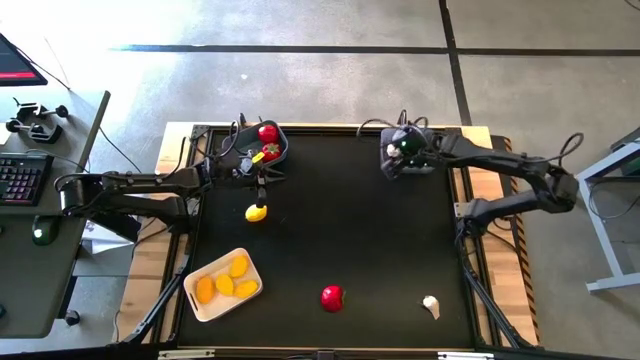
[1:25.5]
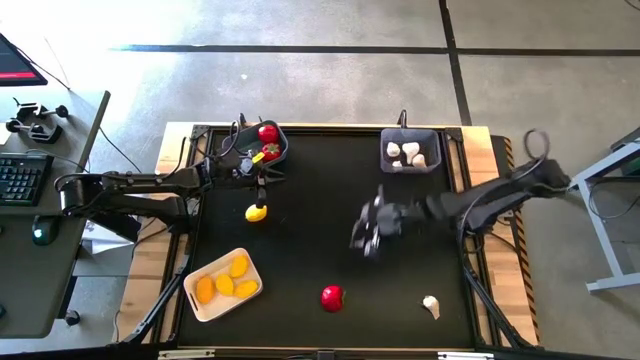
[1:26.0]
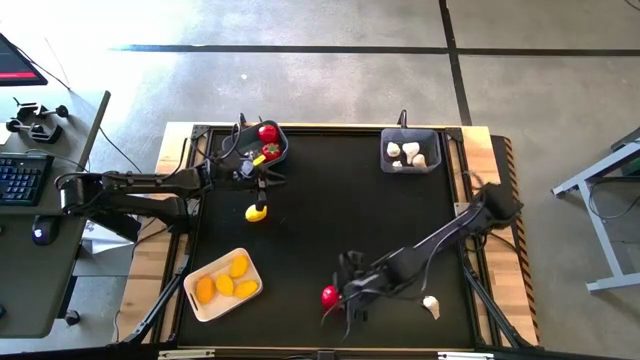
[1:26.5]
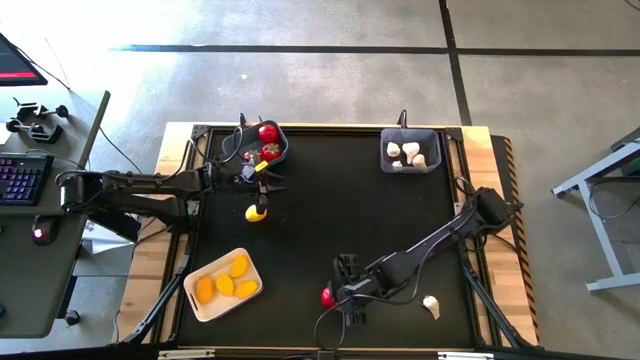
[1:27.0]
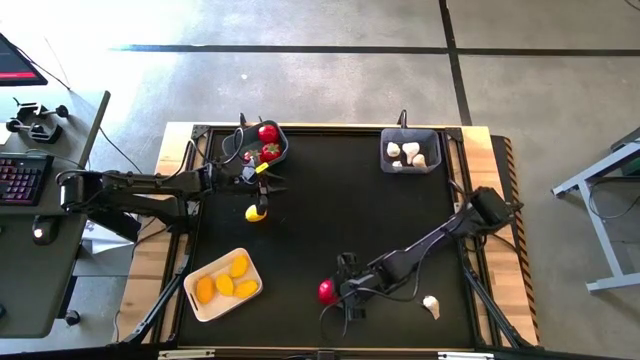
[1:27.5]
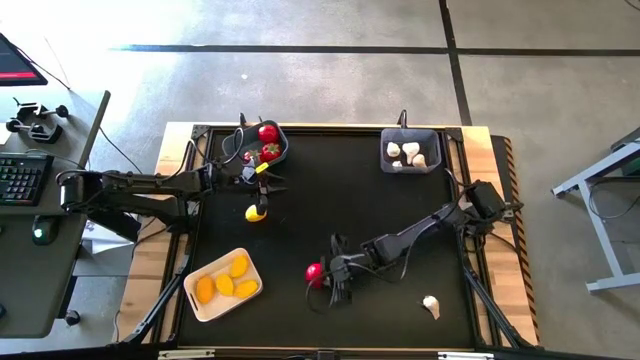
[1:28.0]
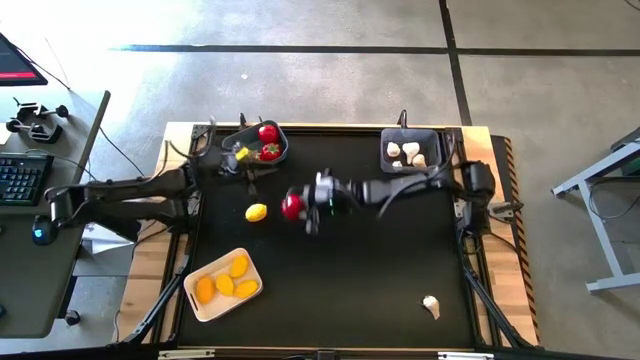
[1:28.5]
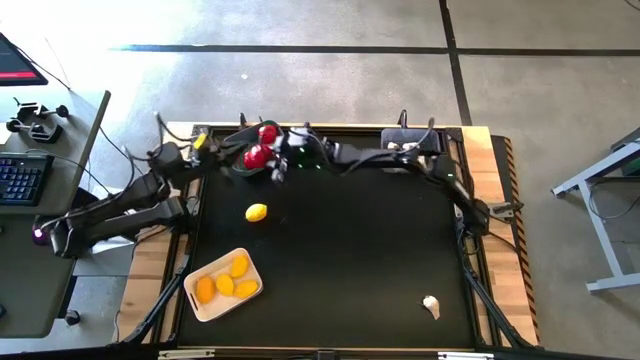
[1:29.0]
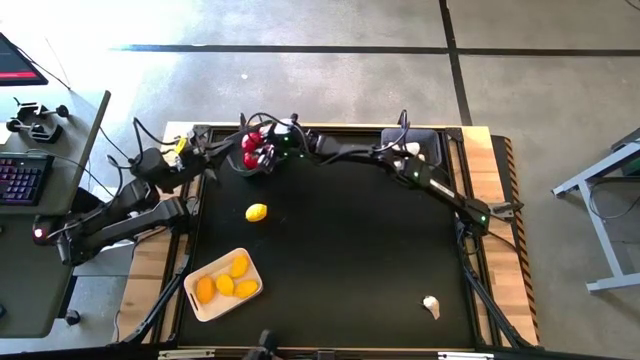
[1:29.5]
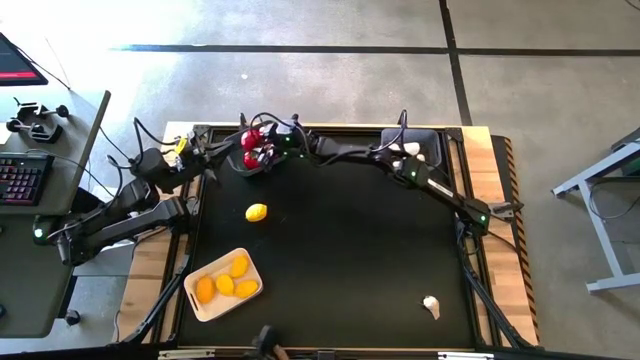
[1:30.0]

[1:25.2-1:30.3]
Task: Sort produce into baskets
Put the red tomato into the light blue bin

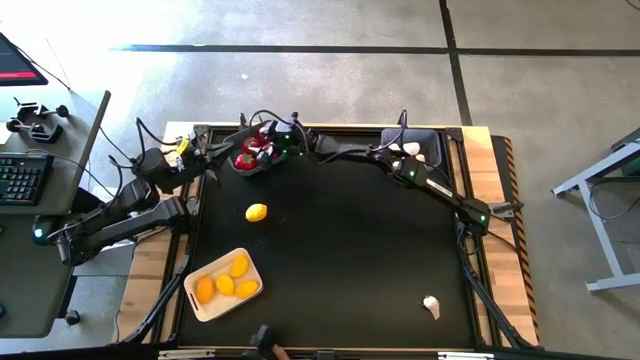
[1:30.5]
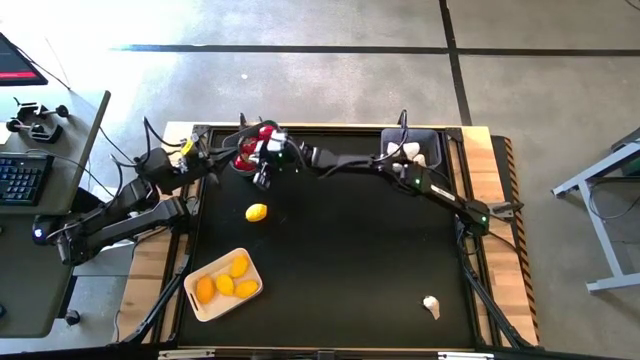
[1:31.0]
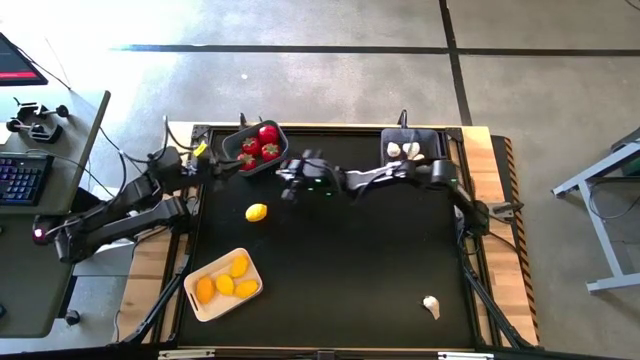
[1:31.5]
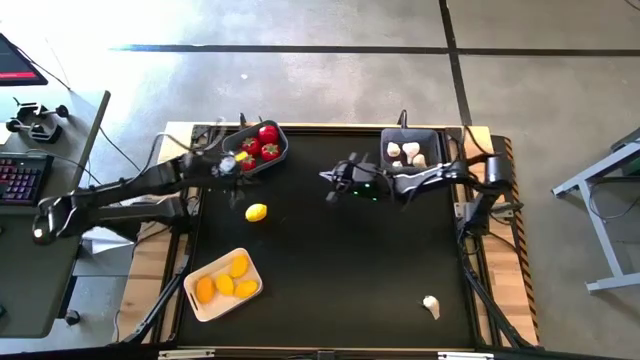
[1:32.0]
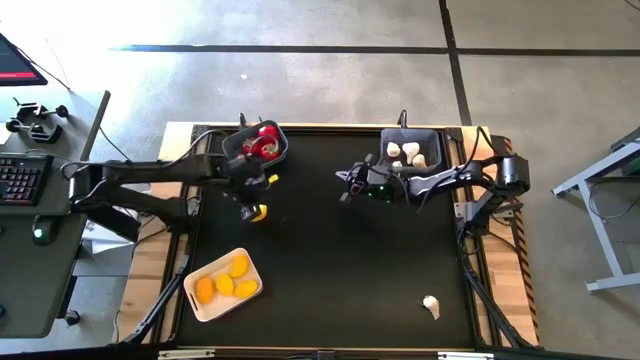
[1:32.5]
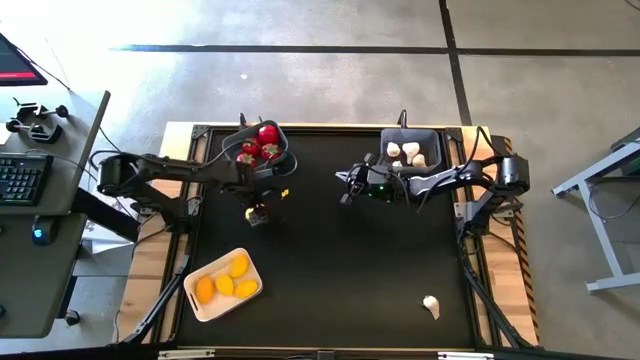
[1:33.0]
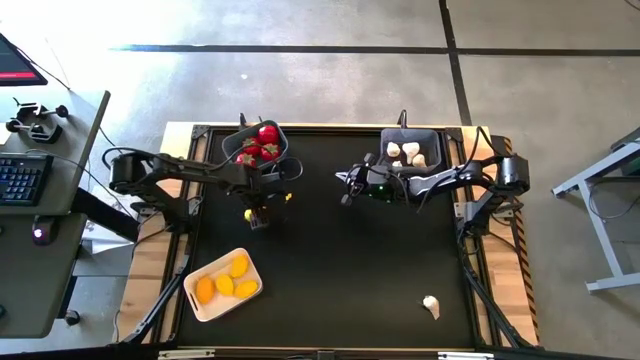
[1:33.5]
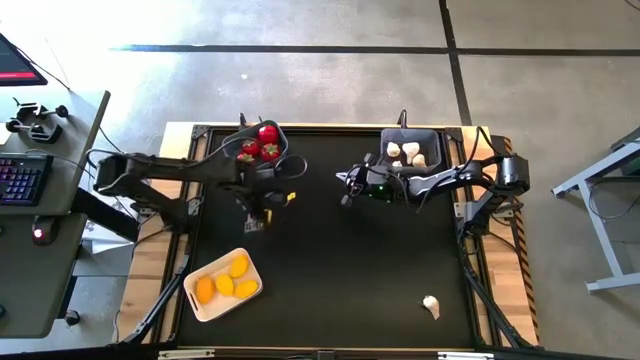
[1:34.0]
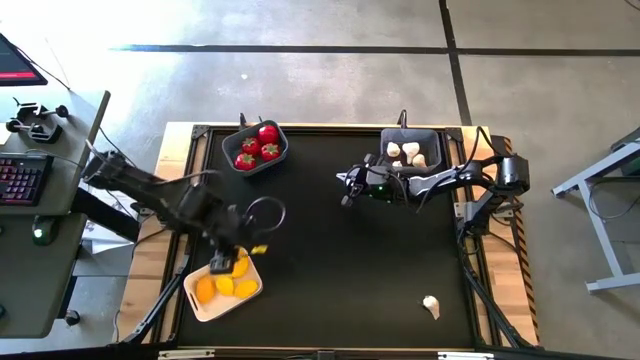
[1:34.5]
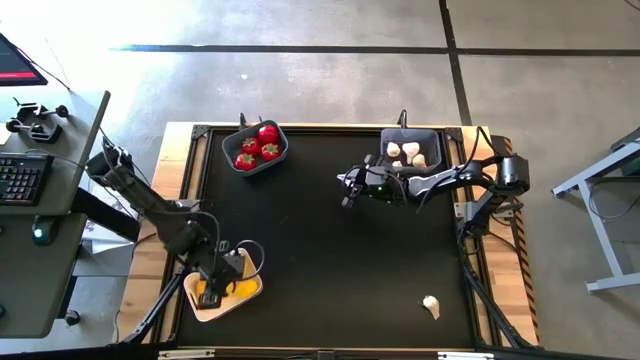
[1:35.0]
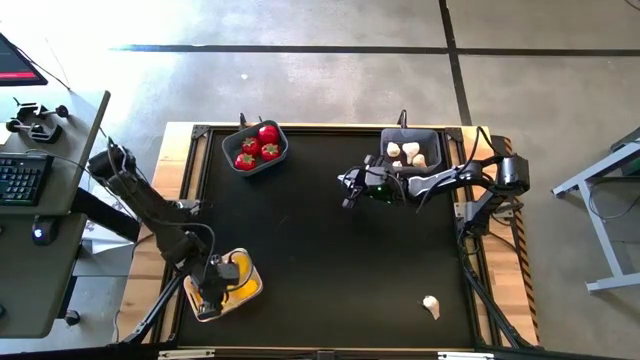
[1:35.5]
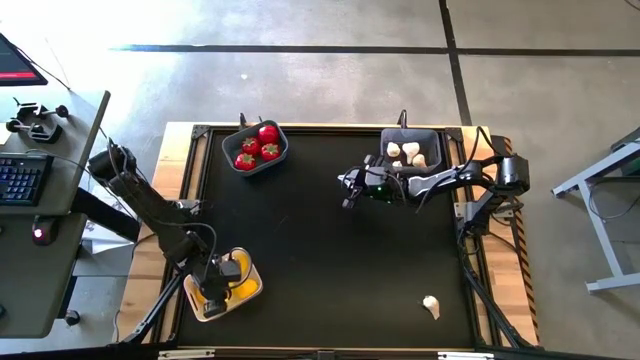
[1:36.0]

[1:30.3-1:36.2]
Put the yellow lemon into the white bin

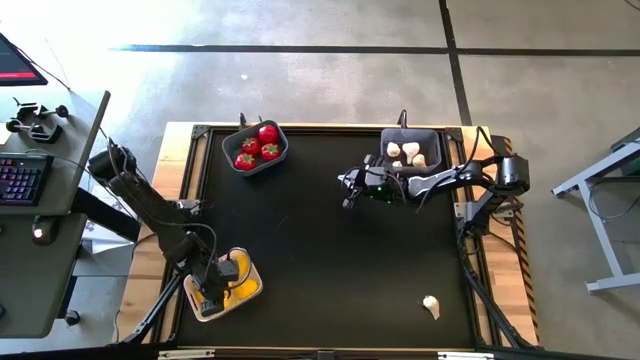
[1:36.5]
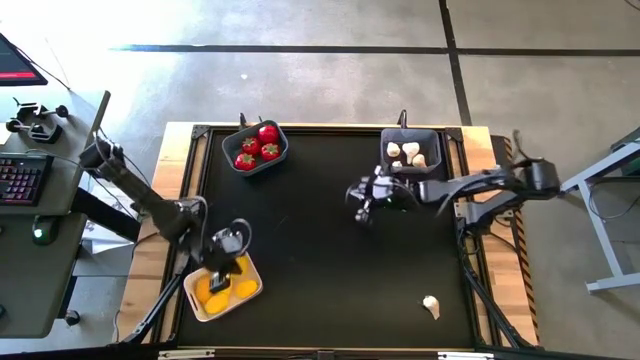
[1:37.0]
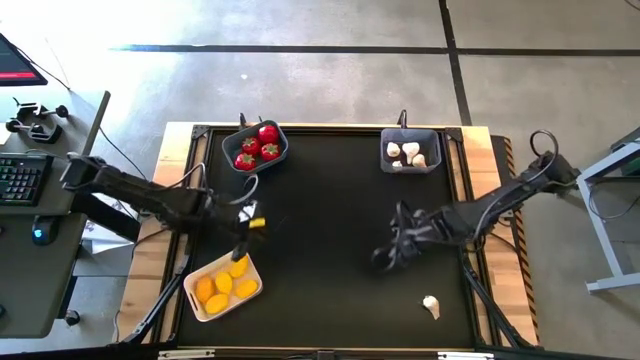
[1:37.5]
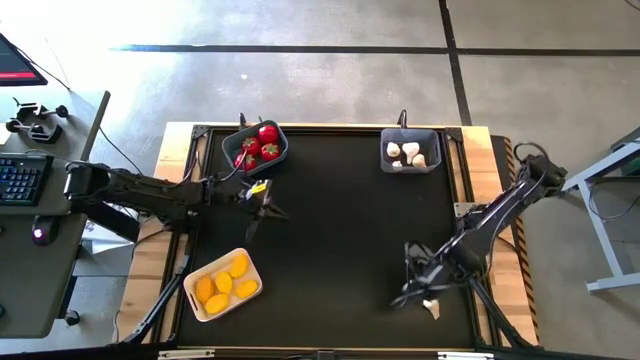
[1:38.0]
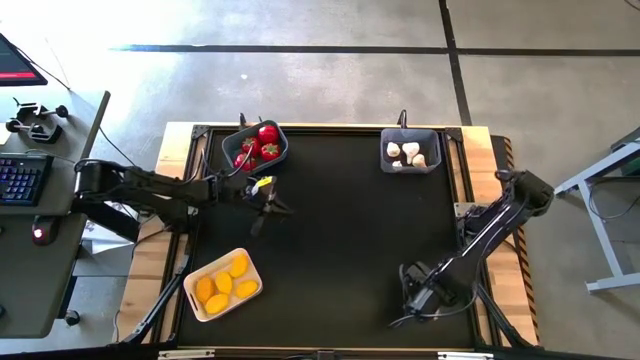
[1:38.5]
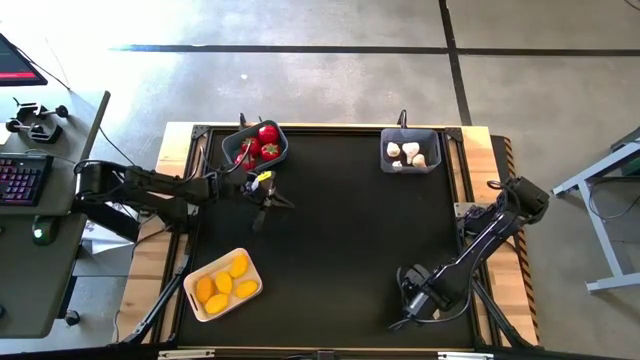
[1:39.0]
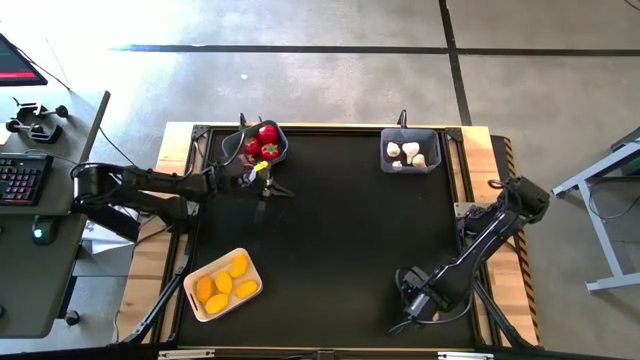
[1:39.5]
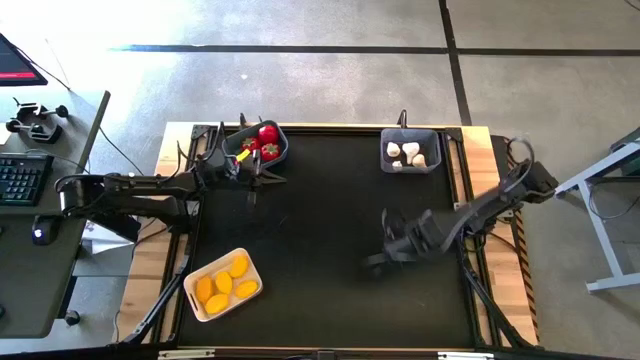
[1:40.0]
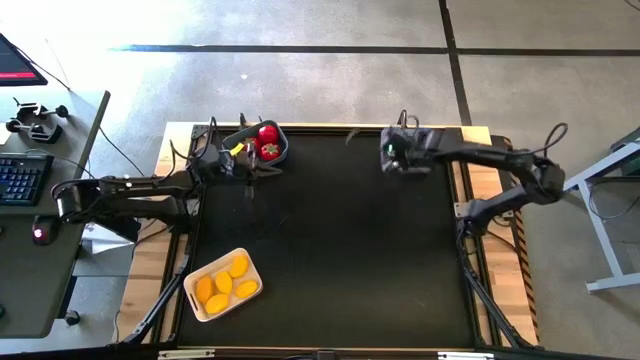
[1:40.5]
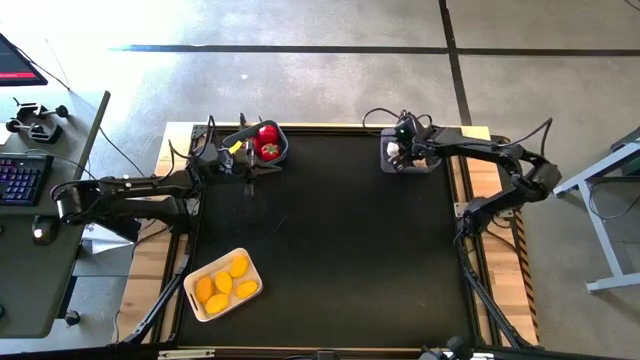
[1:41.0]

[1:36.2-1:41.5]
Put the white garlic into the transparent bin

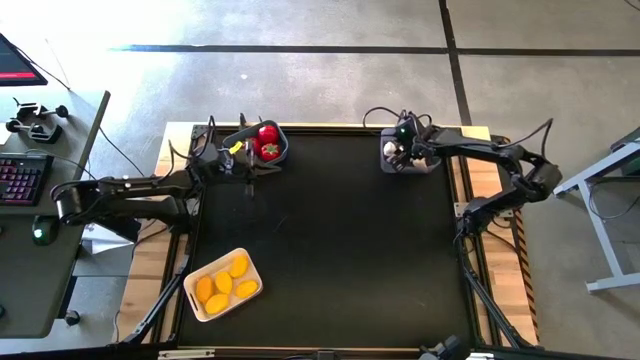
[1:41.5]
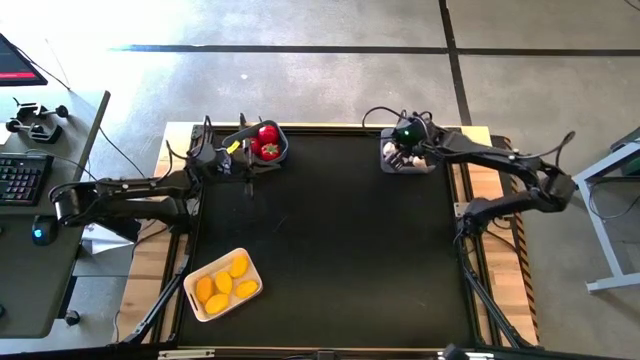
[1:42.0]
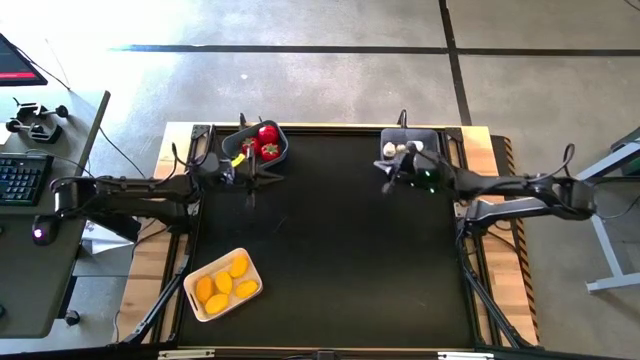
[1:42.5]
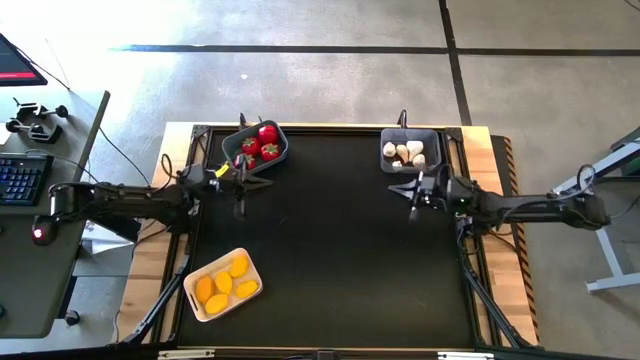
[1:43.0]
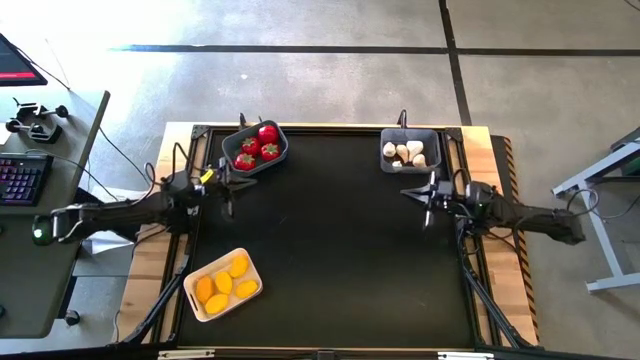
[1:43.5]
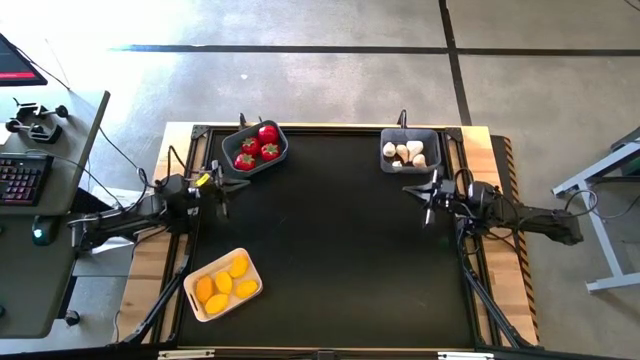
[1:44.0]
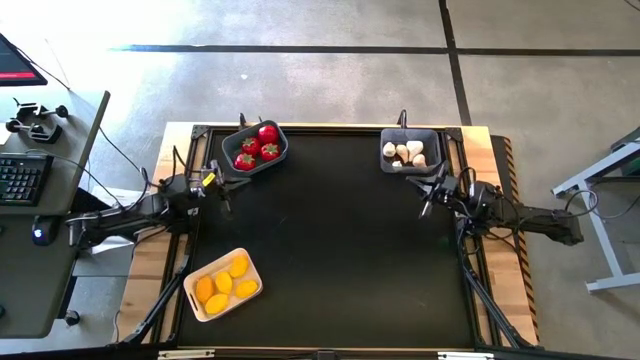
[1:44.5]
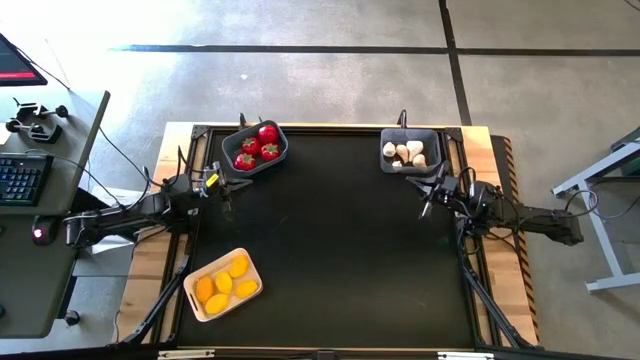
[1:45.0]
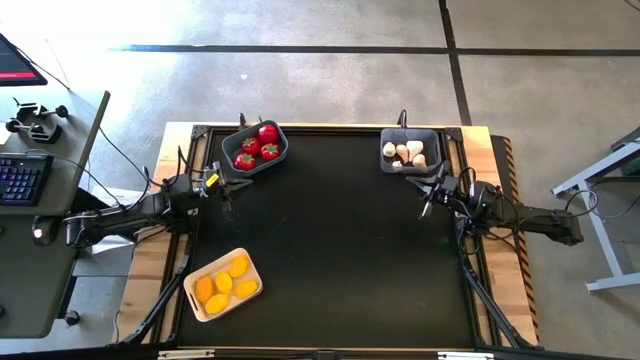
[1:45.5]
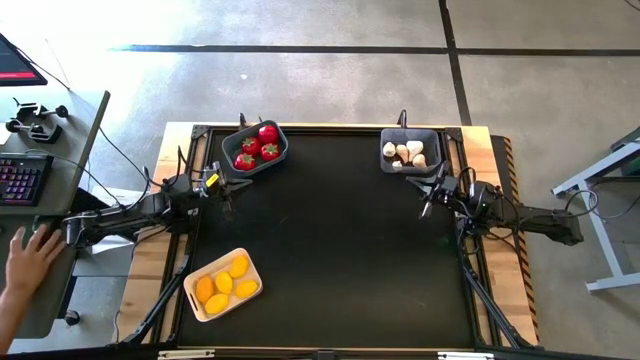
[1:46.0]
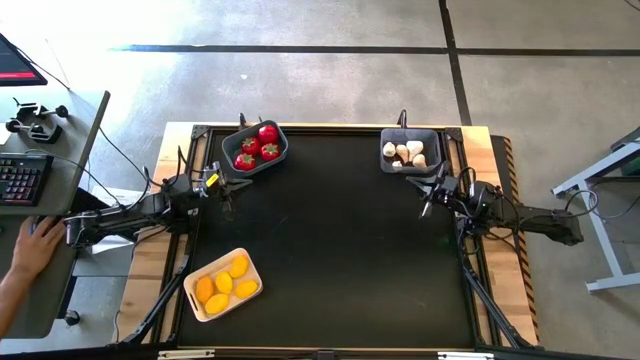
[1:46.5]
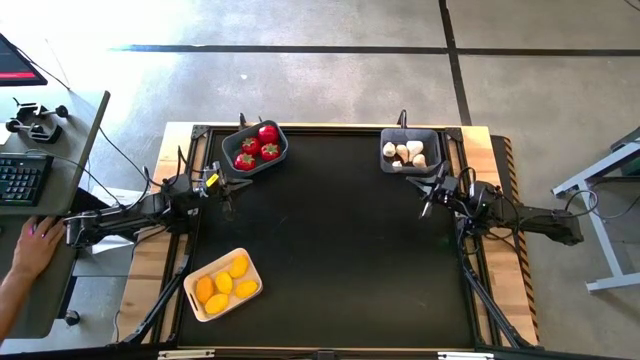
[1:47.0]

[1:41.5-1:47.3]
Return to Home Position
